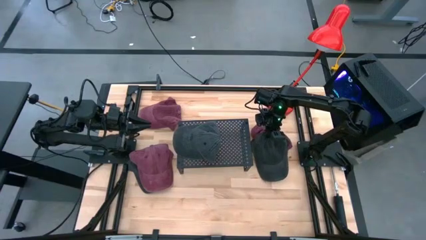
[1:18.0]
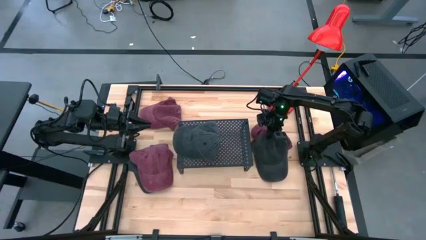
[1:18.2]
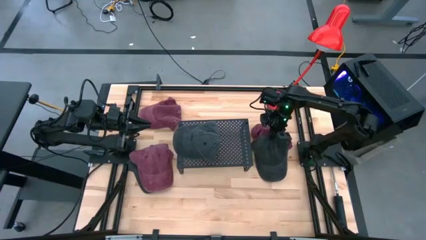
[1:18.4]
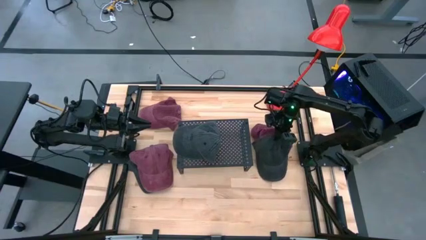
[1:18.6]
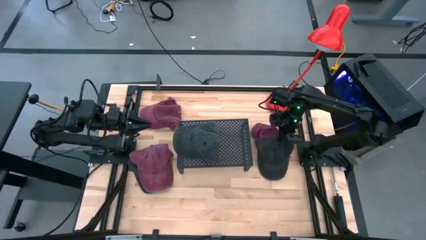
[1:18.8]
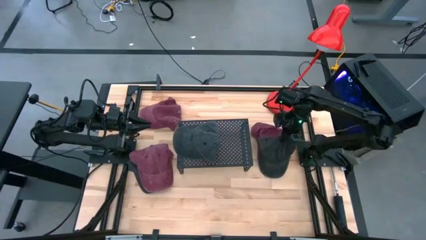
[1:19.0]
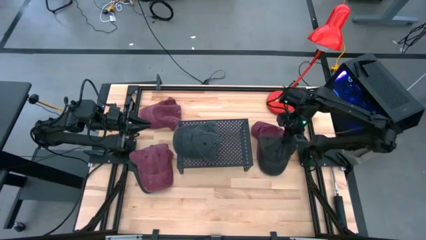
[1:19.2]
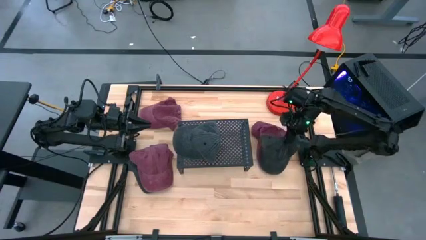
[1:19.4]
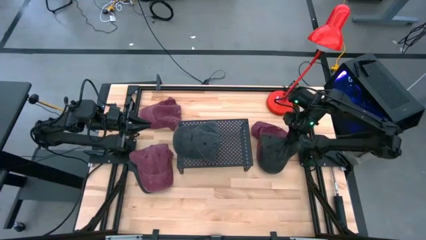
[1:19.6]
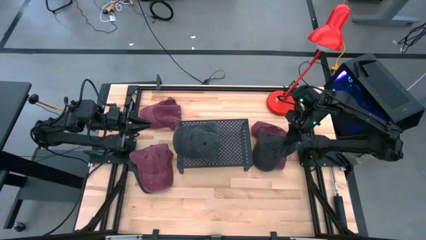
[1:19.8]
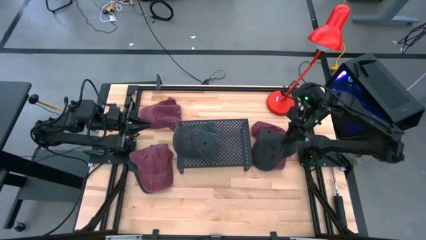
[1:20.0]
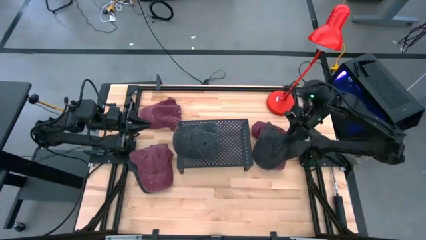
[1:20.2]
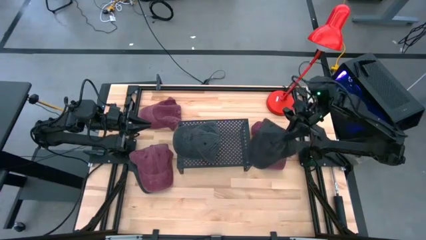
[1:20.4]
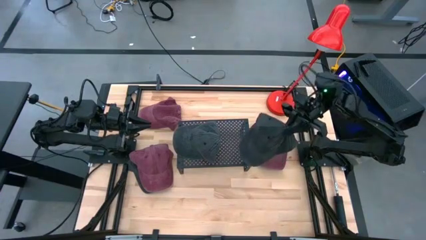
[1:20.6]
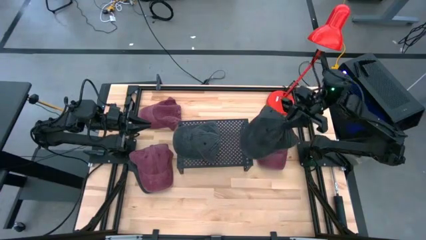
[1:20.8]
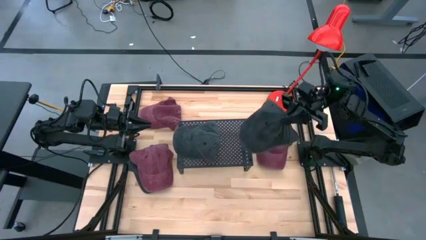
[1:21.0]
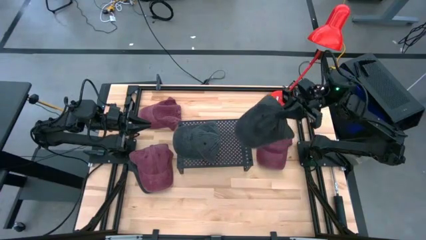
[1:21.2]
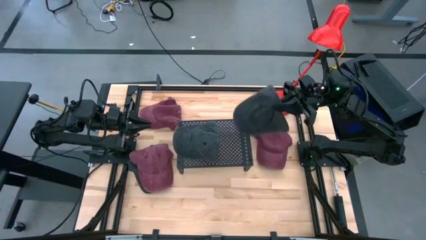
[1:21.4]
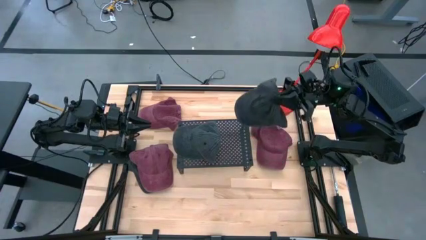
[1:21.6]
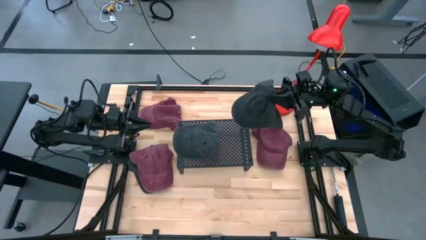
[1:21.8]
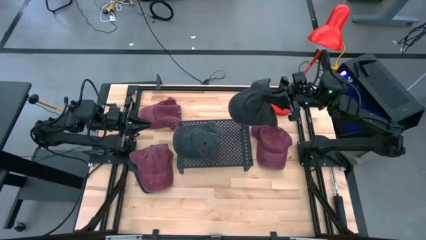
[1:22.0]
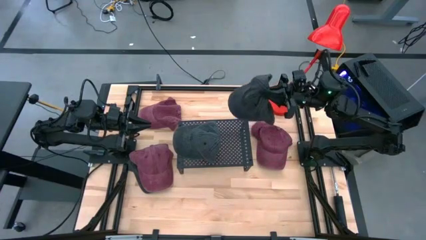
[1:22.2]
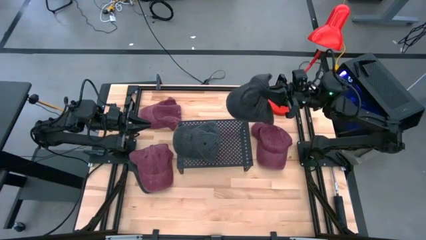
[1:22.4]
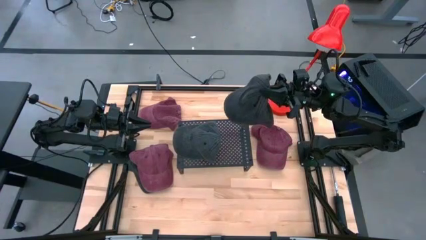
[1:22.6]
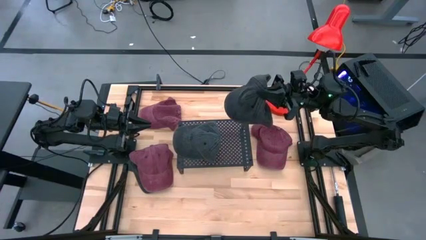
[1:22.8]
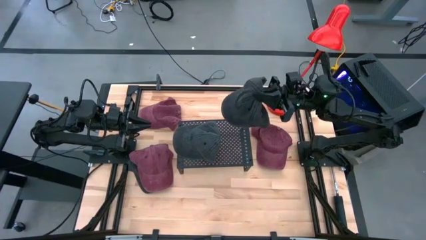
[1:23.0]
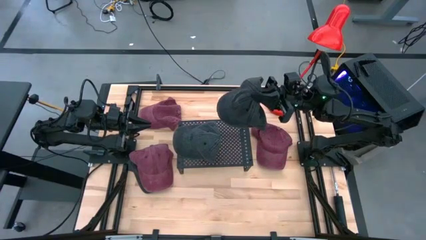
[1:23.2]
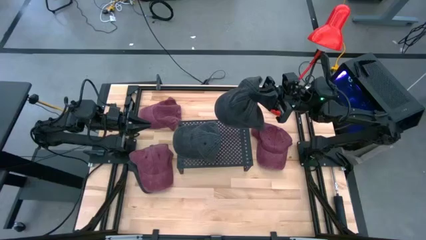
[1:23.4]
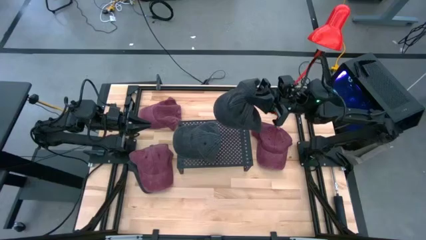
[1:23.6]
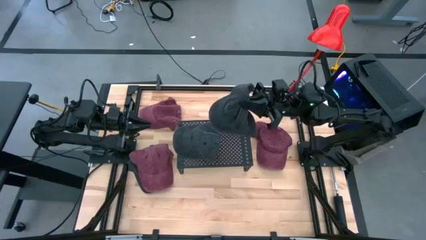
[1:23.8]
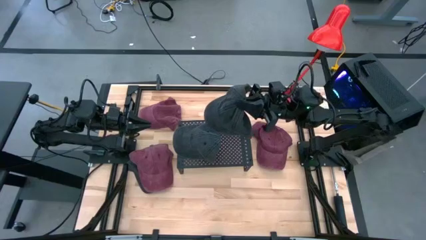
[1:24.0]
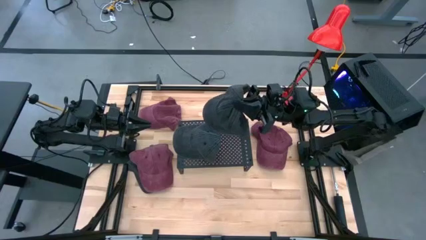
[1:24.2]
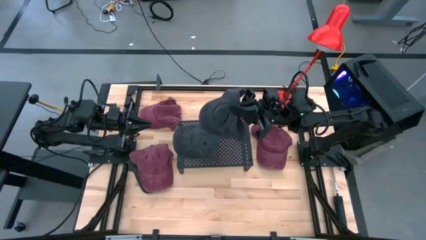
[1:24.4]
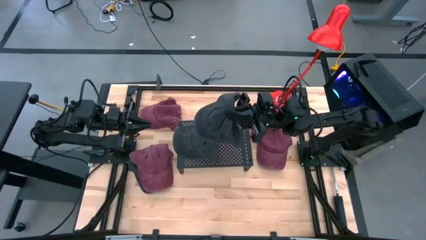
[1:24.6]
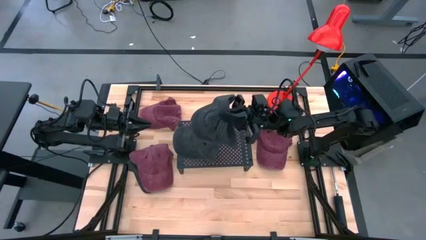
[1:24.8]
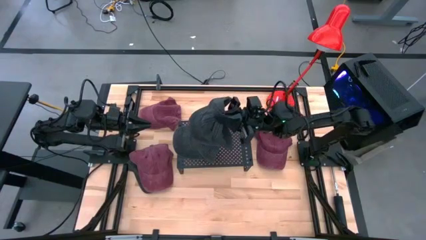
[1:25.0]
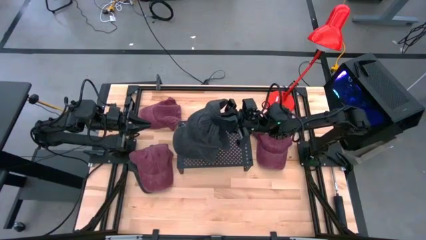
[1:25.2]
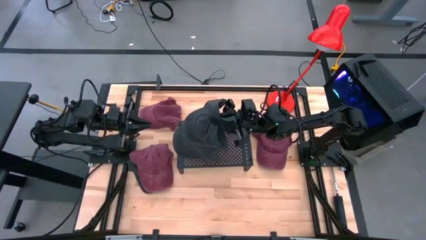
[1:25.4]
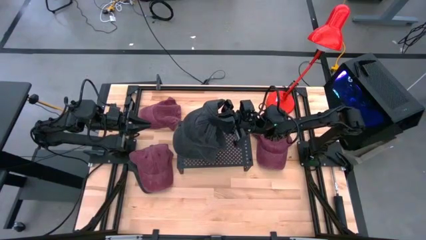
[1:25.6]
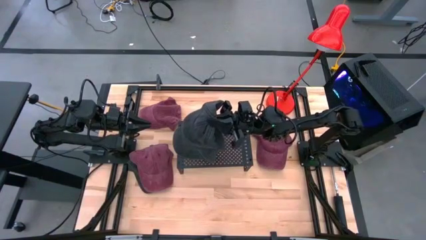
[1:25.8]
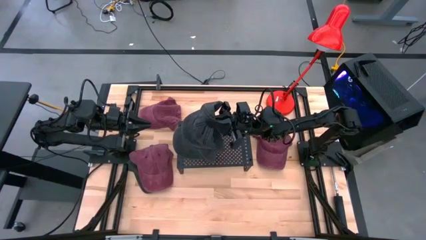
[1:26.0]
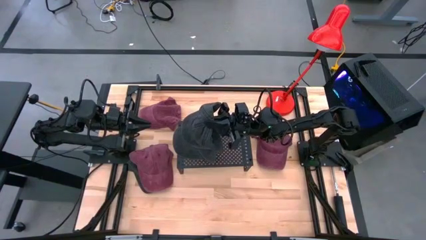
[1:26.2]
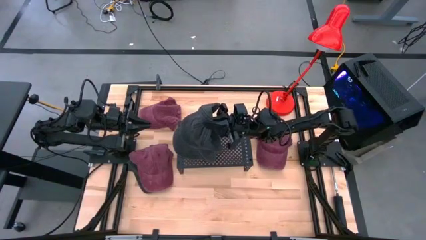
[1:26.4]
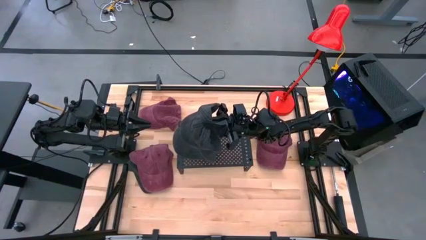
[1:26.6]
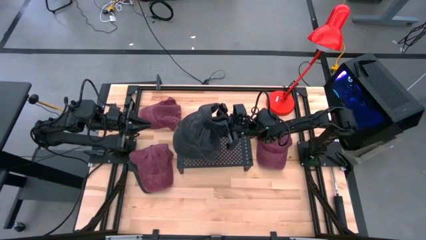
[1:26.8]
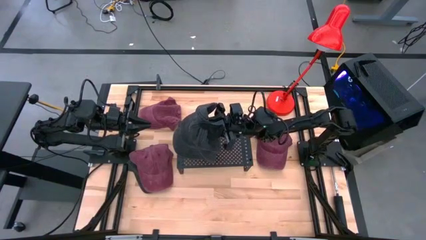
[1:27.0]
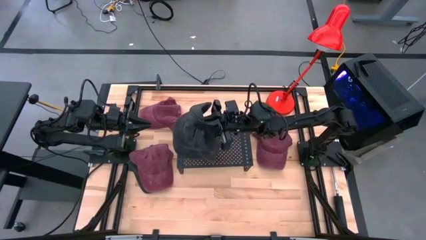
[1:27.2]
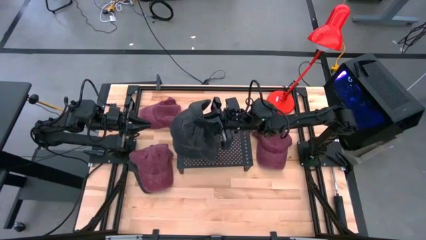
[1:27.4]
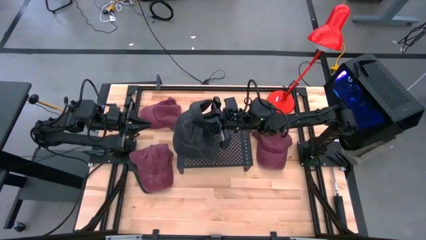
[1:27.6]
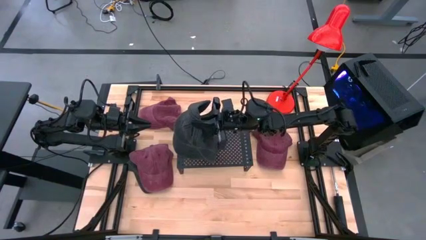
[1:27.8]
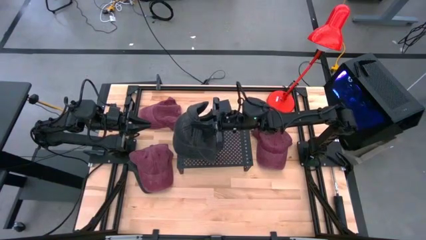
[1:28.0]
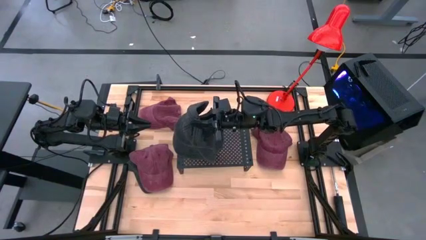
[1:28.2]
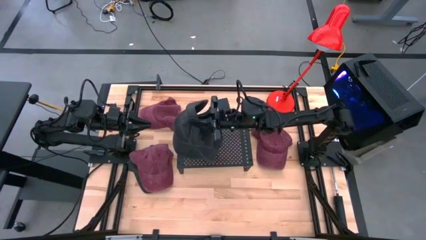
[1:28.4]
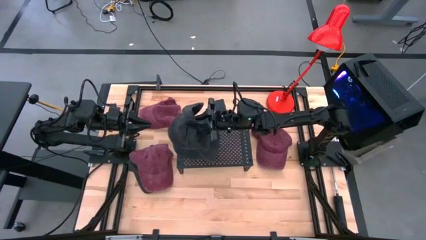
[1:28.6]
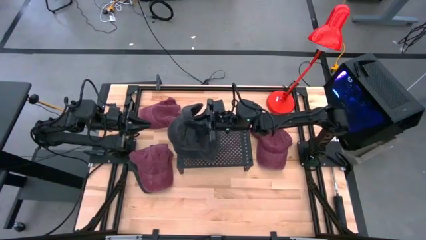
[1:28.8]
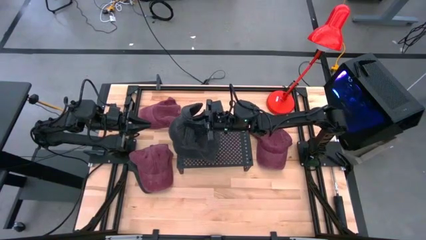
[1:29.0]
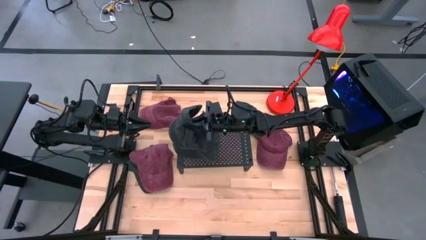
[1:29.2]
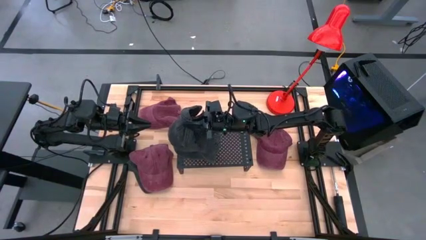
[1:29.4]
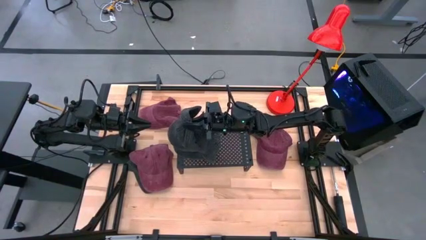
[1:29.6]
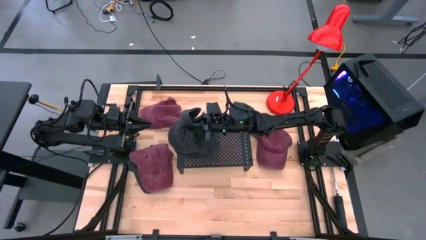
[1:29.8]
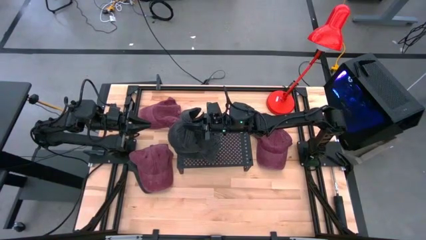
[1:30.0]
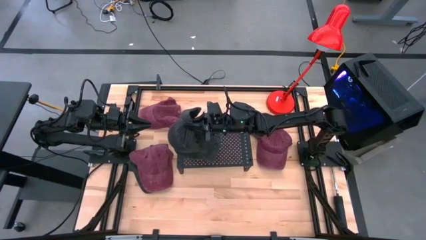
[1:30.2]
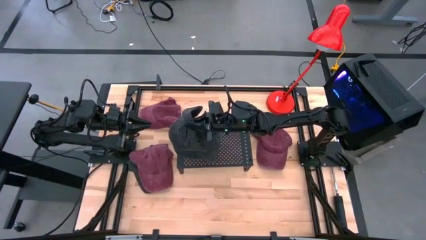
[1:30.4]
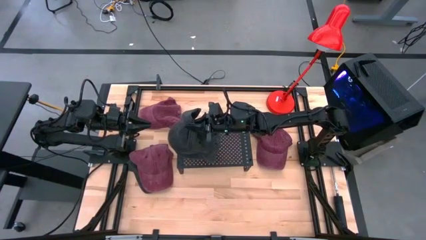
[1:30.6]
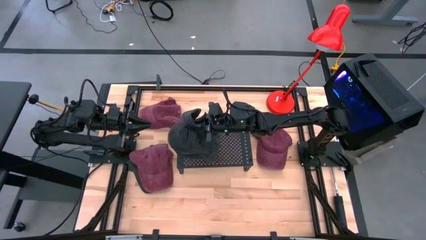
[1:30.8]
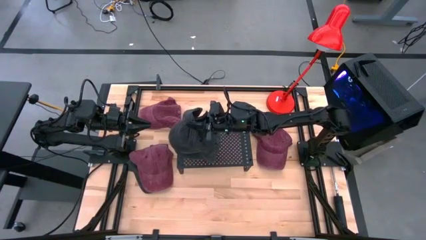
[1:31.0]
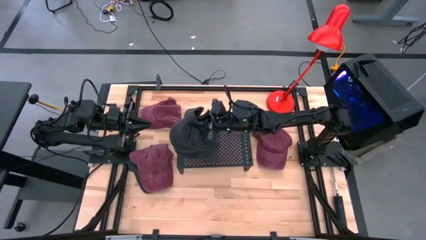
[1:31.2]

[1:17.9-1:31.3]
Task: Pick & Place hat
Stack the right black cap on top of the black cap on the shelf

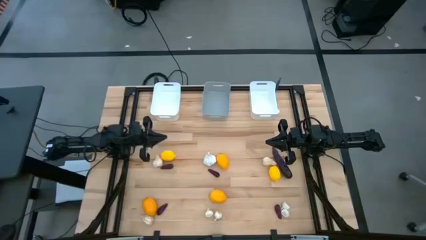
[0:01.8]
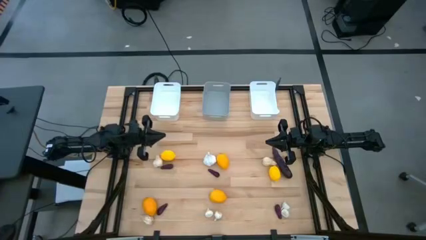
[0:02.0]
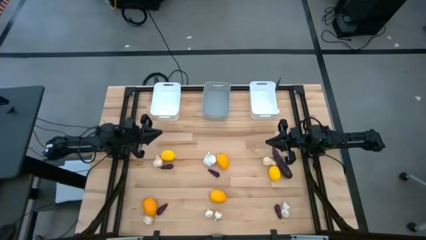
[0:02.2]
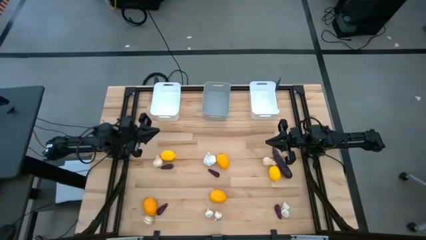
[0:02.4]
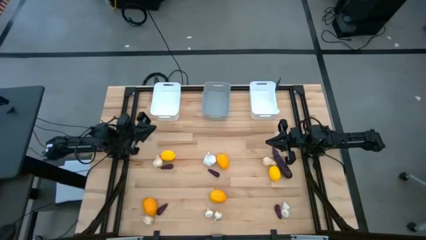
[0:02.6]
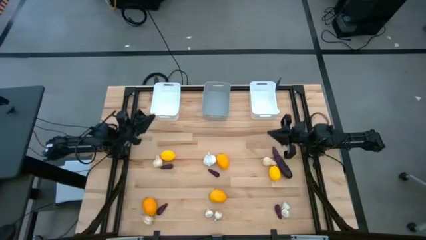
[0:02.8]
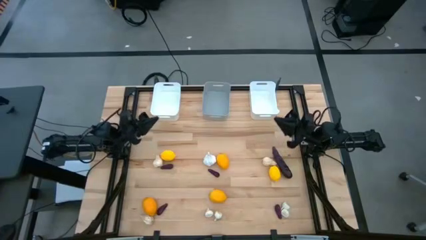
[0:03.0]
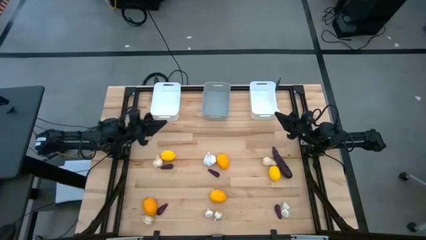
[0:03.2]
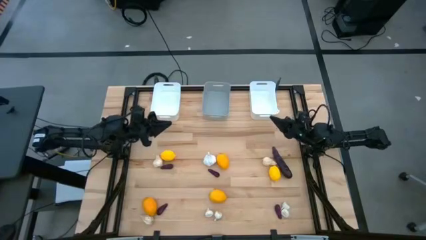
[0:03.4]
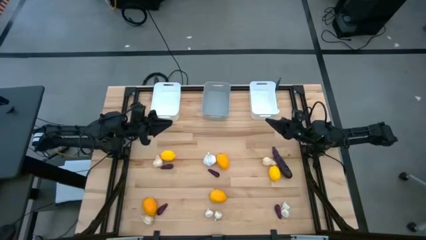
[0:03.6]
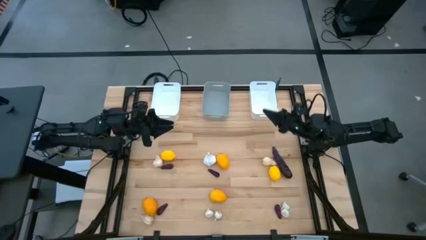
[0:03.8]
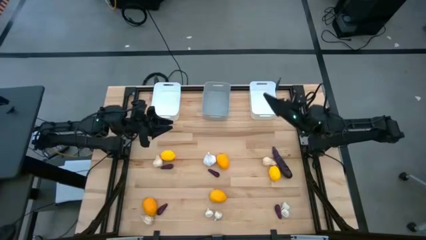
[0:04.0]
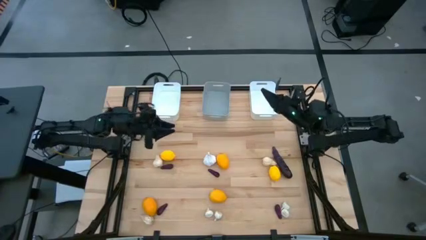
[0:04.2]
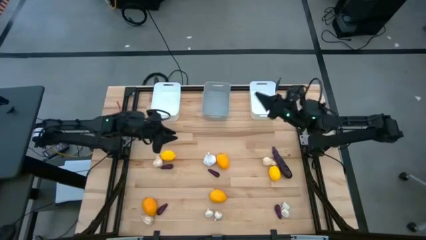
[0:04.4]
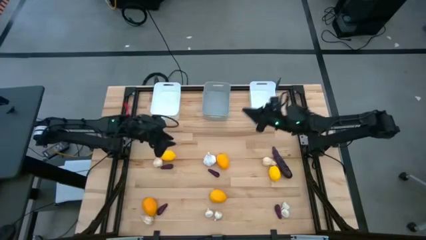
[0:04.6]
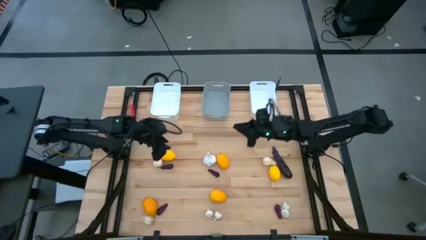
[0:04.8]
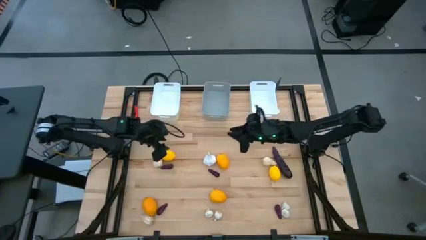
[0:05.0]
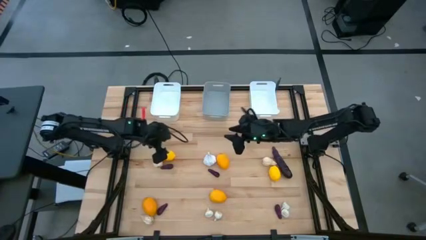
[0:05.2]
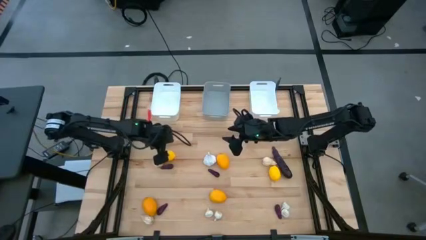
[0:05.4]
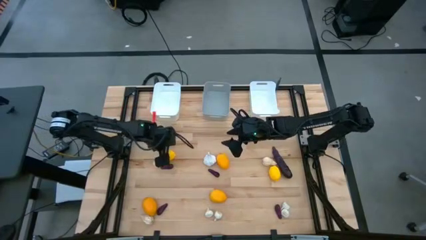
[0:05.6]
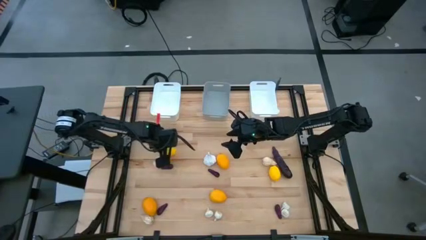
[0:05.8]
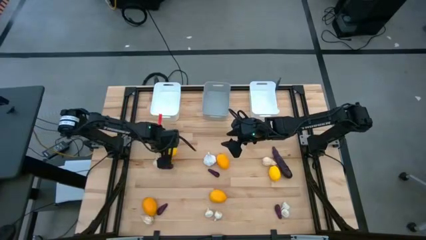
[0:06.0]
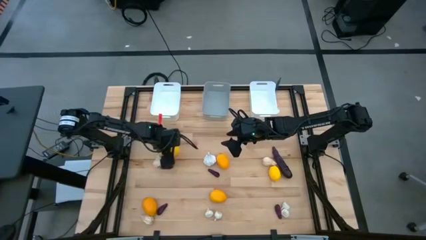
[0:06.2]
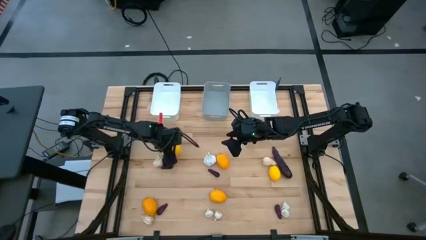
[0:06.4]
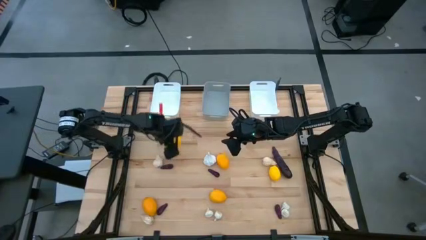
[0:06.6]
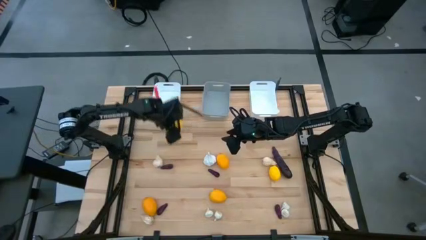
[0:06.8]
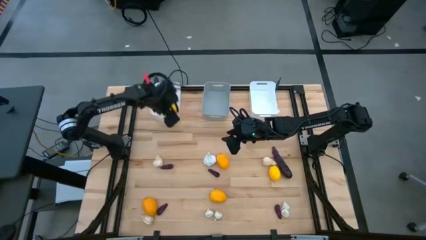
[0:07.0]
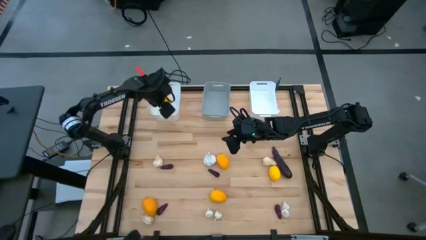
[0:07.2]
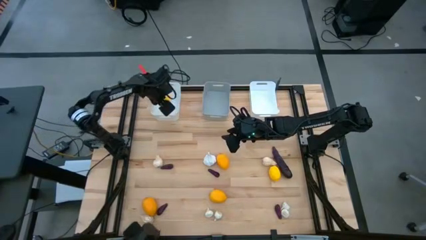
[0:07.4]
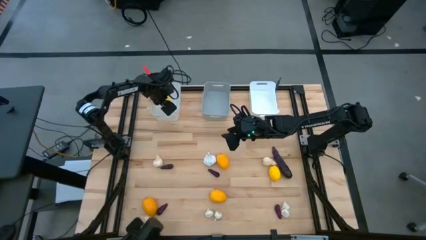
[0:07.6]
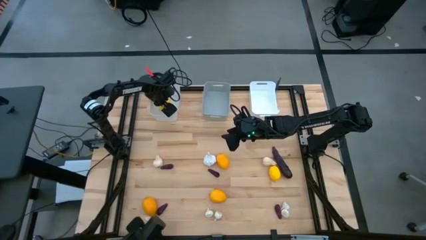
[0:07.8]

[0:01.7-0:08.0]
Task: Sort produce into baskets
Put the lemon into the left white bin
